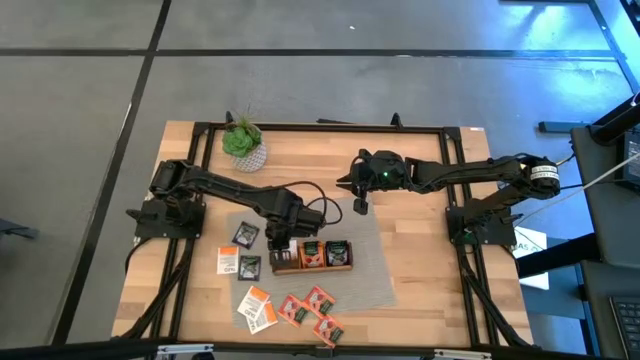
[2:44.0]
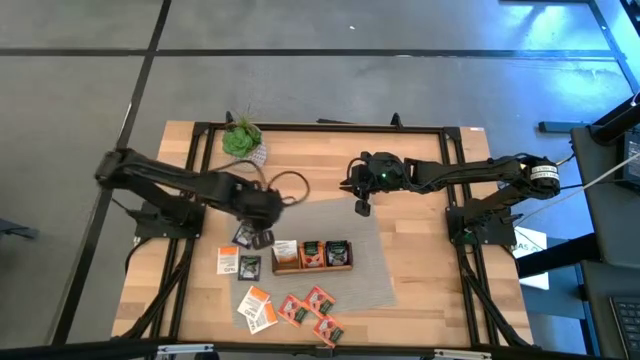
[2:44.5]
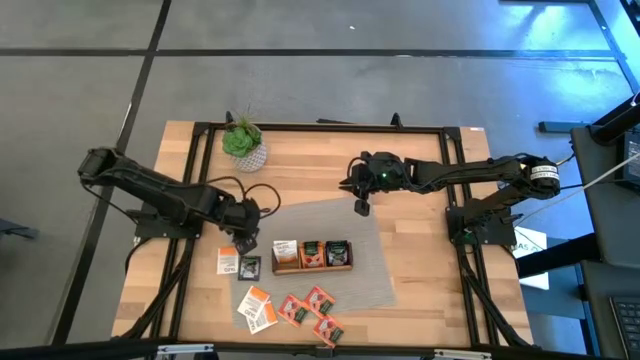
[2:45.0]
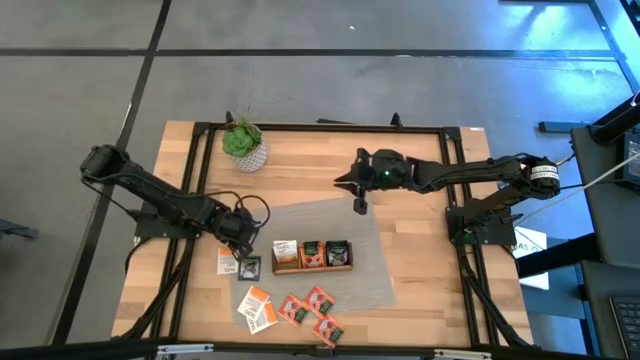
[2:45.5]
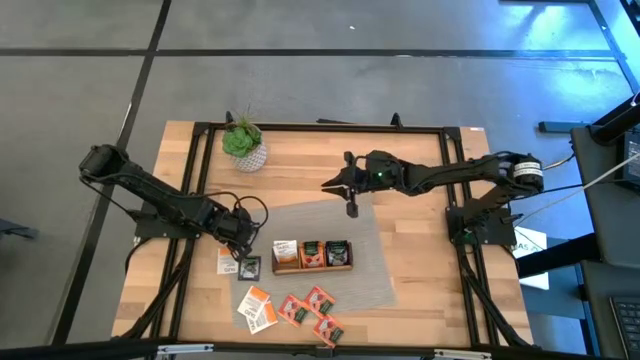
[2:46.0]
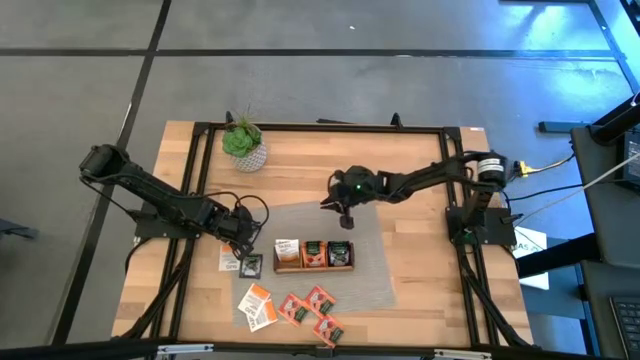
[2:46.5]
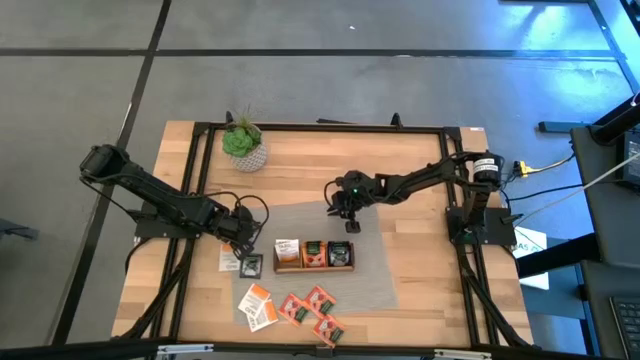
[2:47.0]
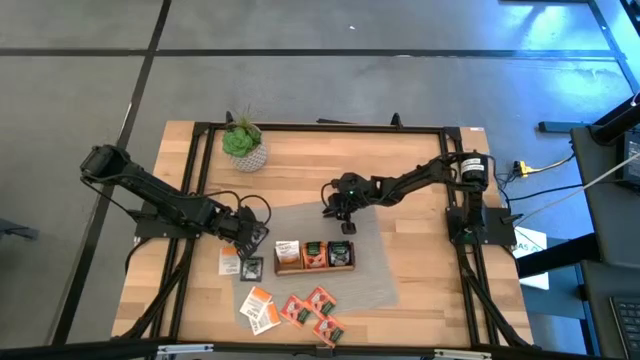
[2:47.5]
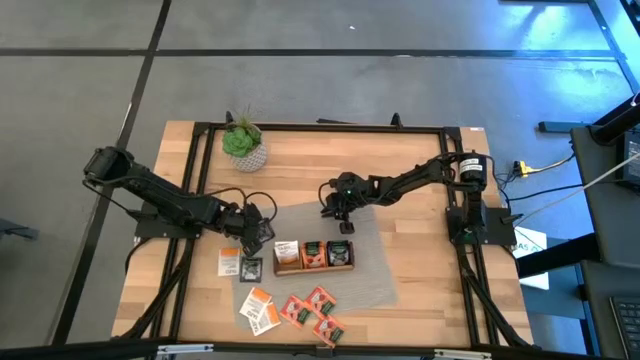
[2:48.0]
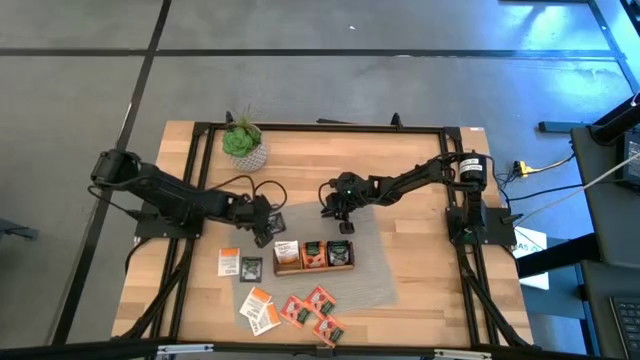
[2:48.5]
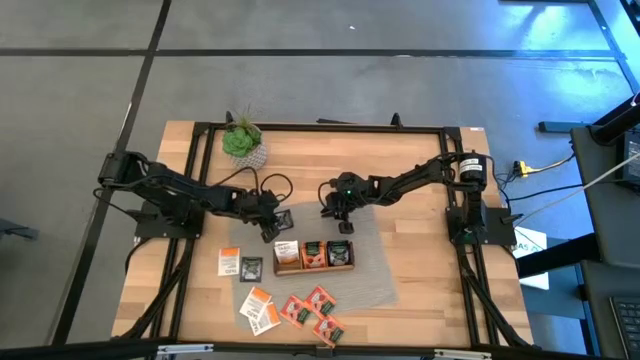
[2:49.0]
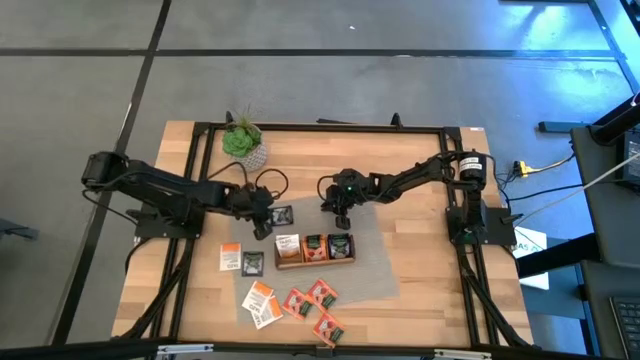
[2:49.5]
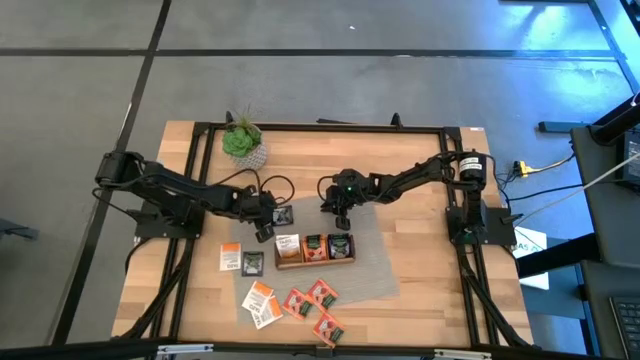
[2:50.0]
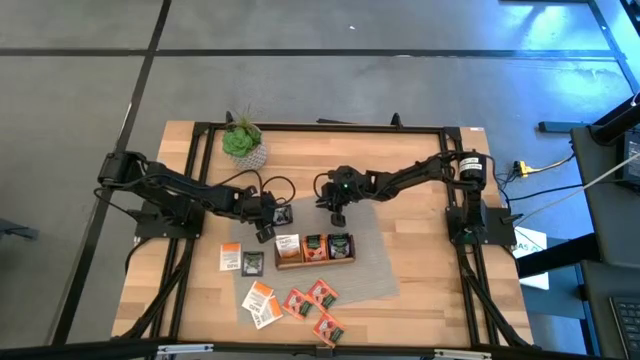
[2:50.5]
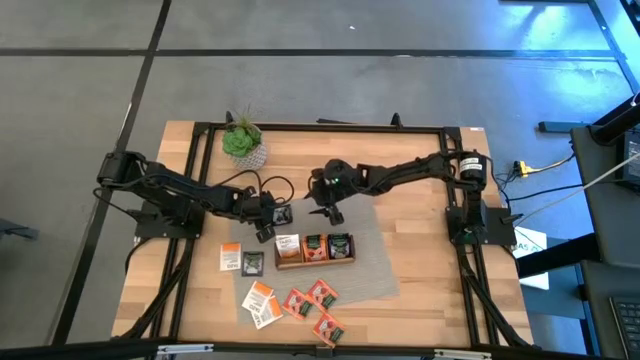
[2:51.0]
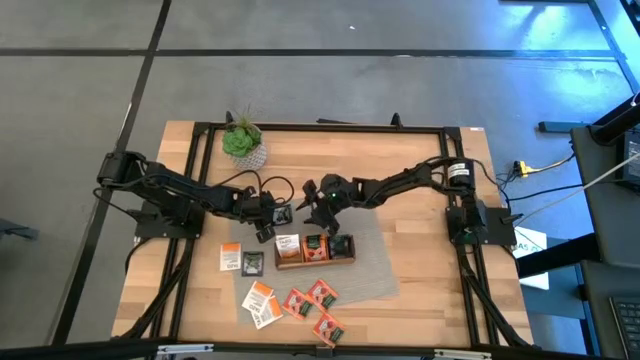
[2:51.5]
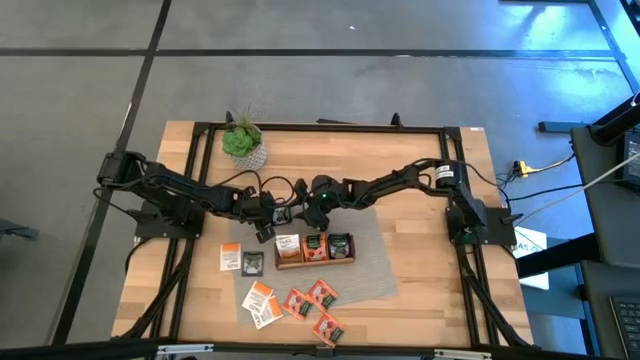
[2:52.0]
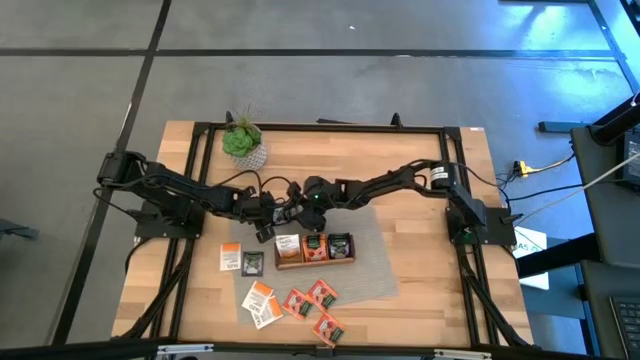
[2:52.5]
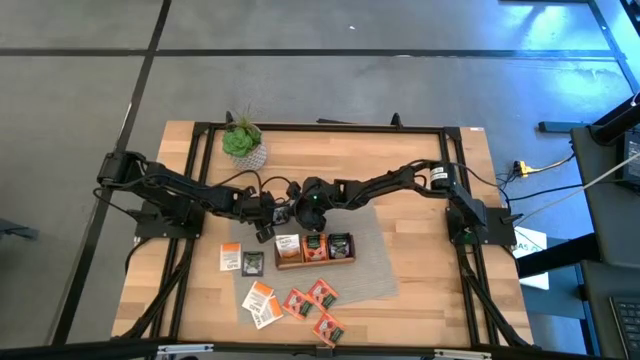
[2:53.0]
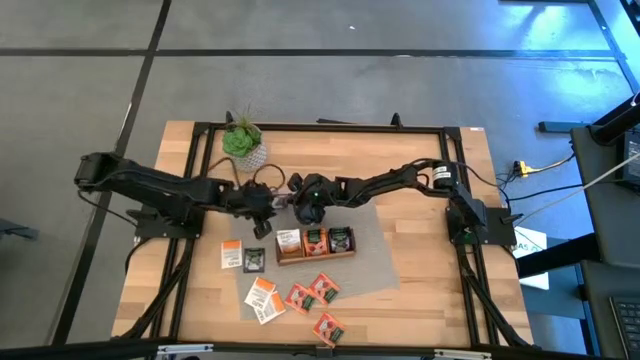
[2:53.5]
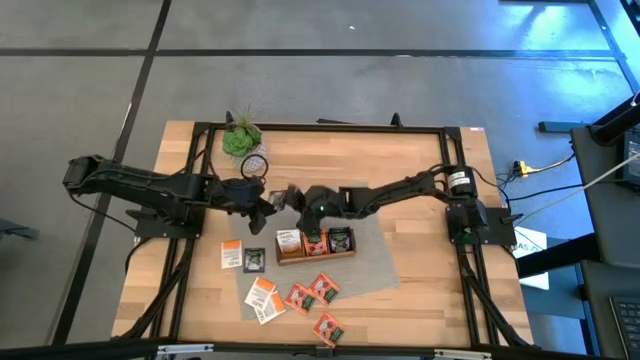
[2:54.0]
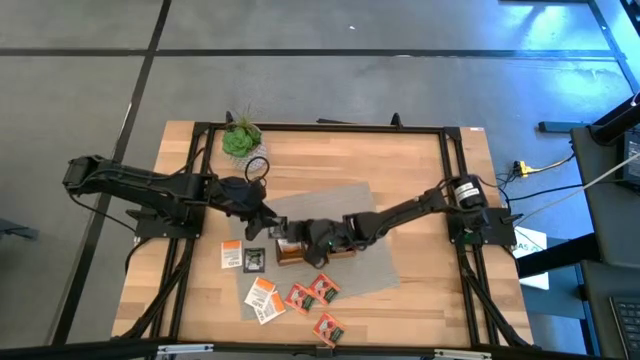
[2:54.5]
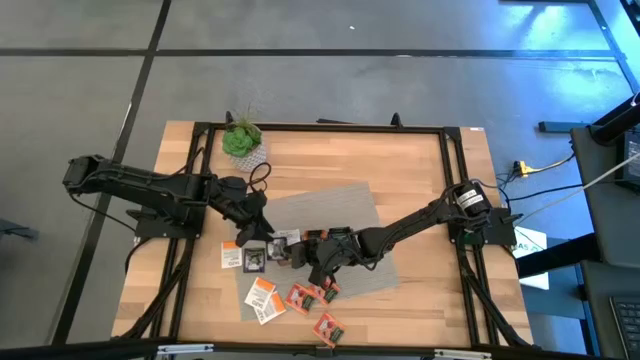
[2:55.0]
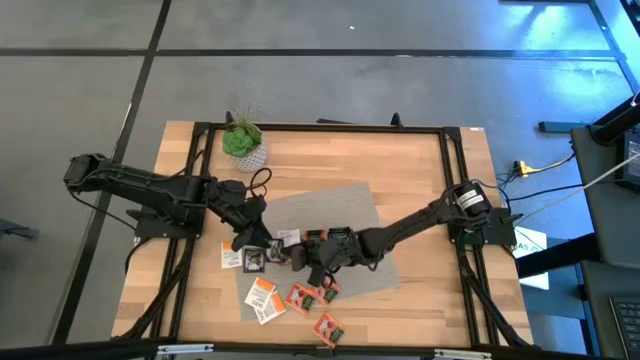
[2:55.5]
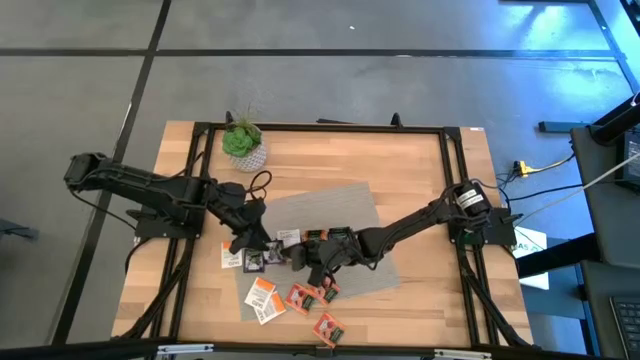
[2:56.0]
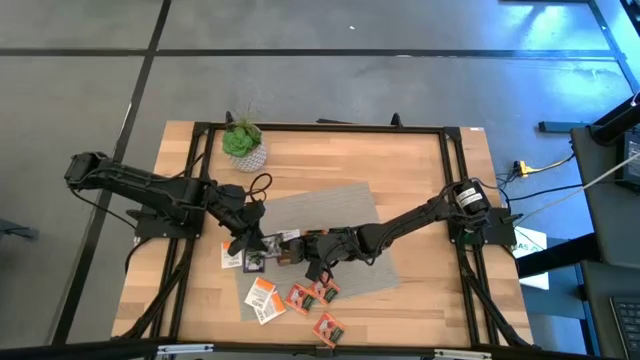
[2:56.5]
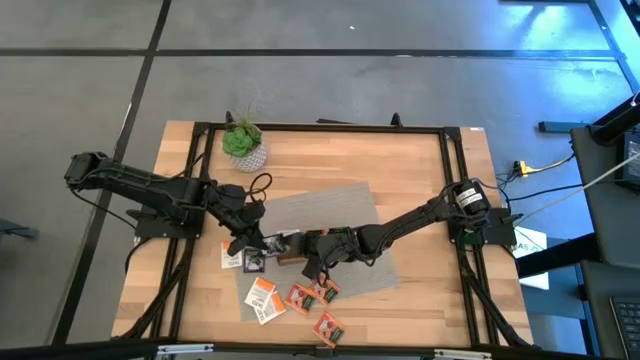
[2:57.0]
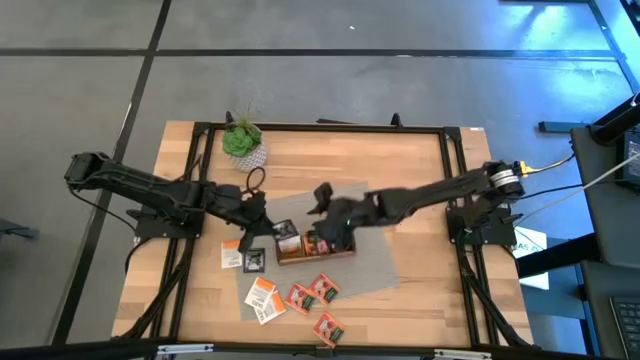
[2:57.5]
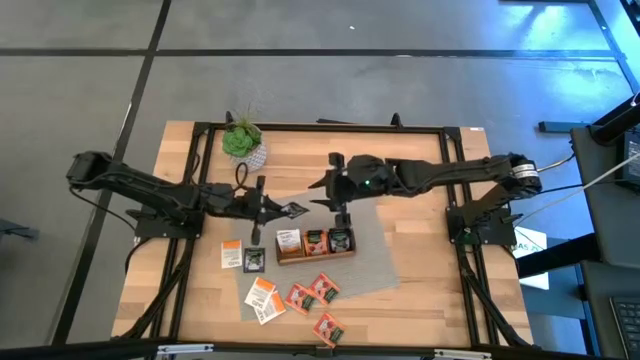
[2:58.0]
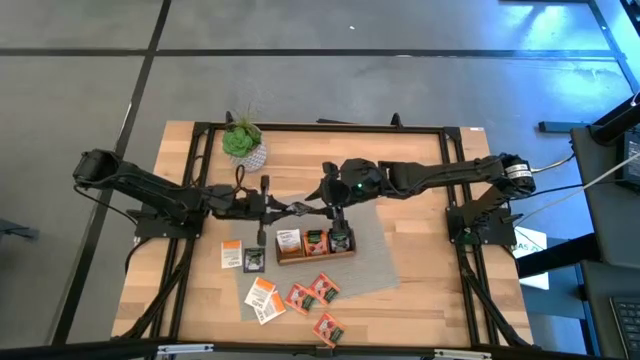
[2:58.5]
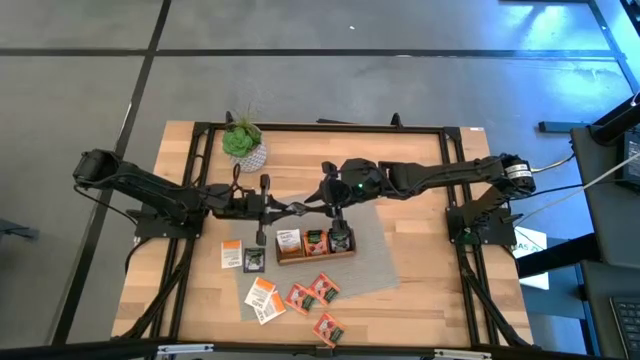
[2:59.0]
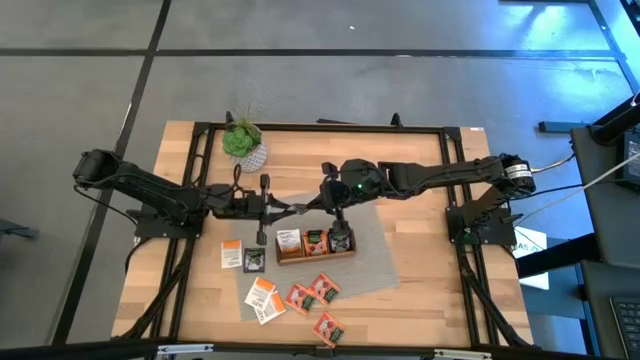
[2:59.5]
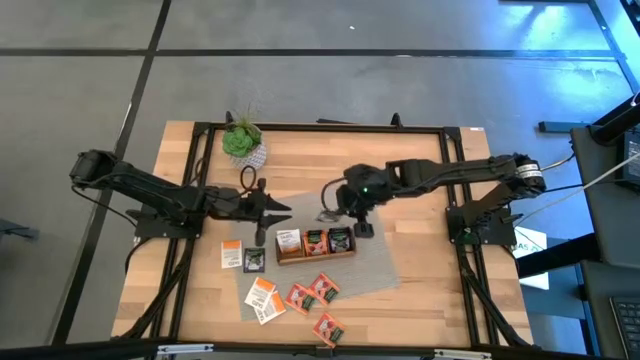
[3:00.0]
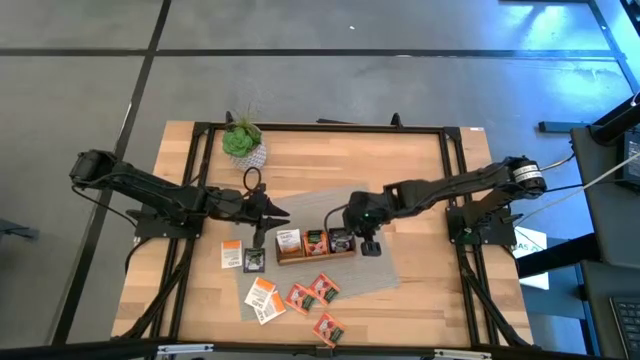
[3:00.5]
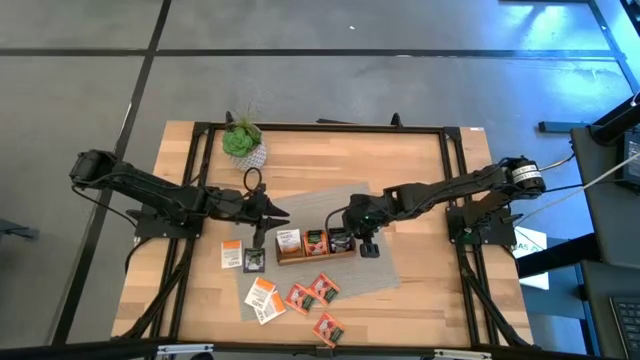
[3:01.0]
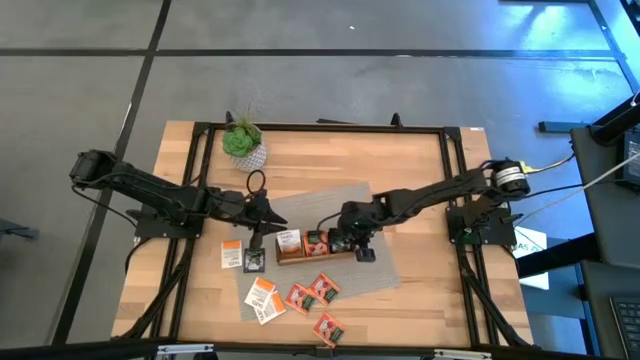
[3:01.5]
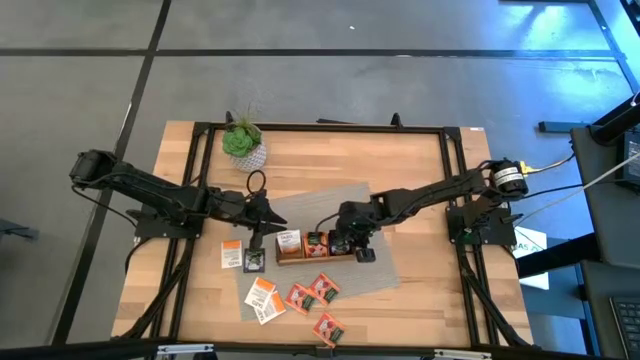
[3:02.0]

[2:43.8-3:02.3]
Task: Pick & Place Tea
Put the purple tea bag into the right section of the wooden organizer

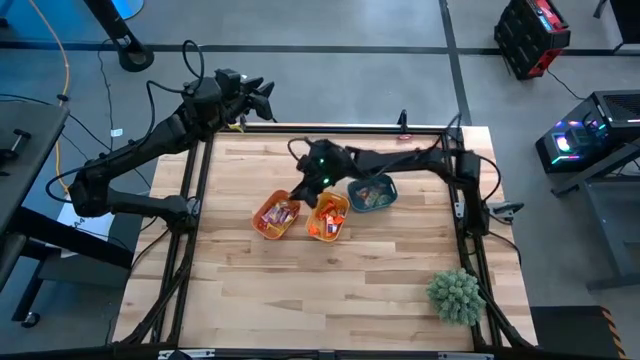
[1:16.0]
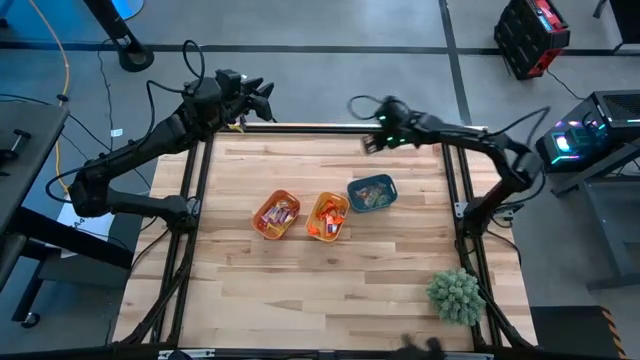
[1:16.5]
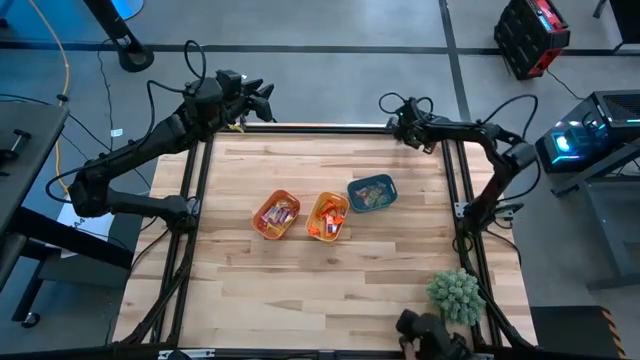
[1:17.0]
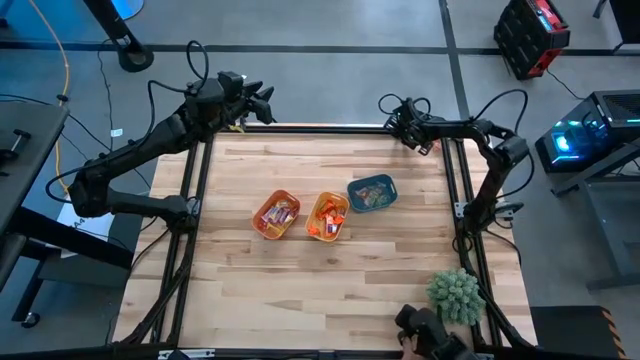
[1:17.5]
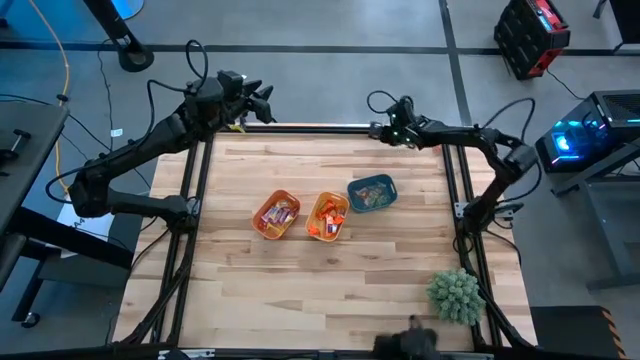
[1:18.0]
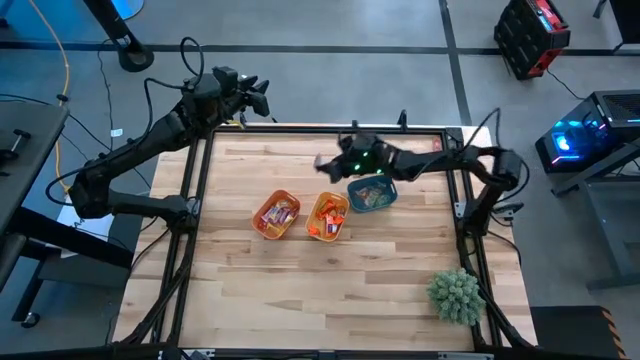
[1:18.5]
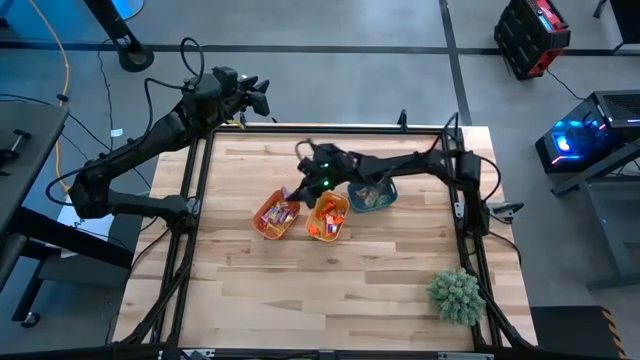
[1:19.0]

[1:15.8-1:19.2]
Task: Sort candy
Put the red candy into the orange bin
